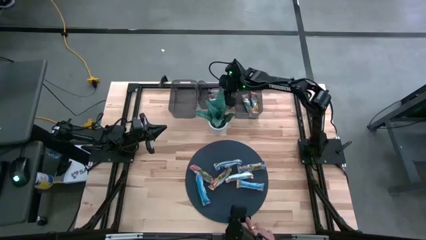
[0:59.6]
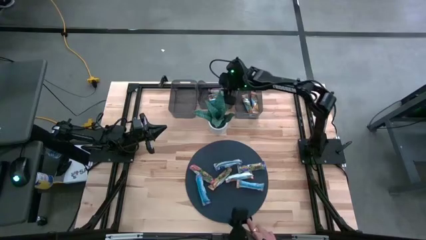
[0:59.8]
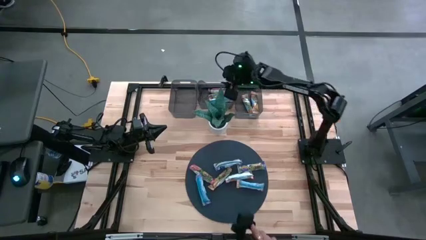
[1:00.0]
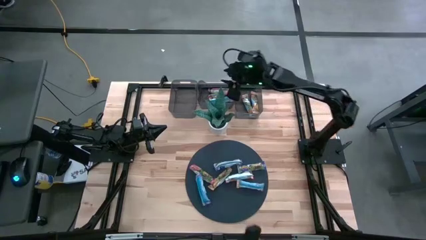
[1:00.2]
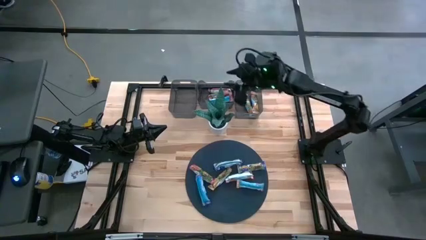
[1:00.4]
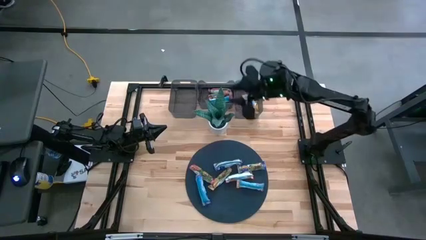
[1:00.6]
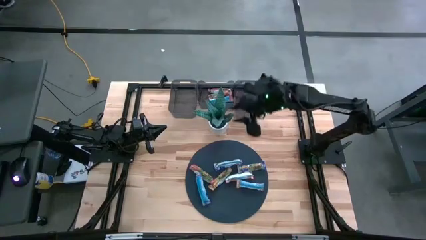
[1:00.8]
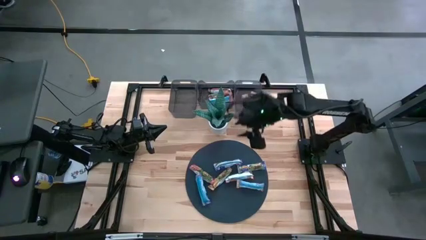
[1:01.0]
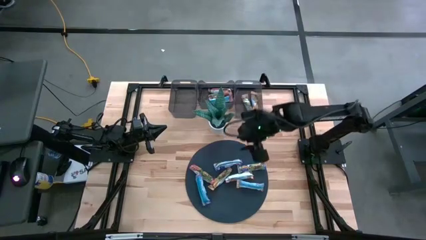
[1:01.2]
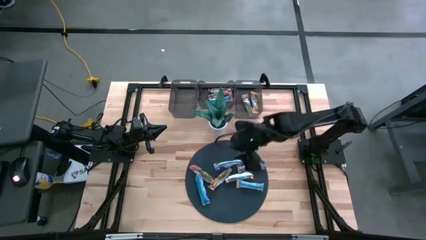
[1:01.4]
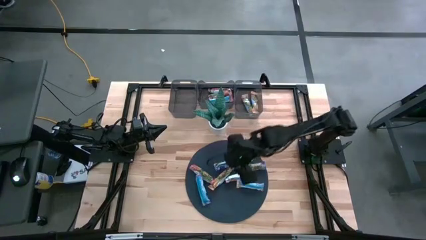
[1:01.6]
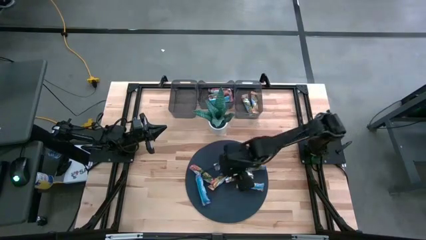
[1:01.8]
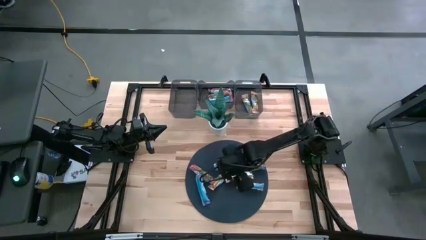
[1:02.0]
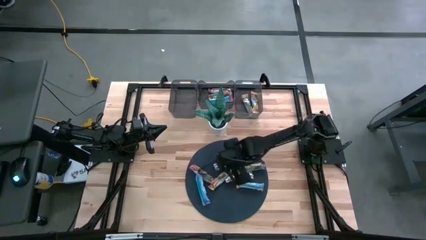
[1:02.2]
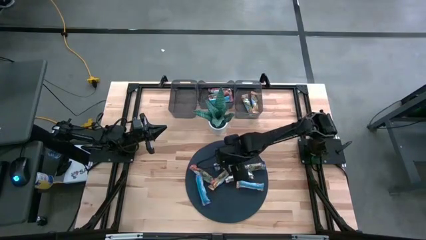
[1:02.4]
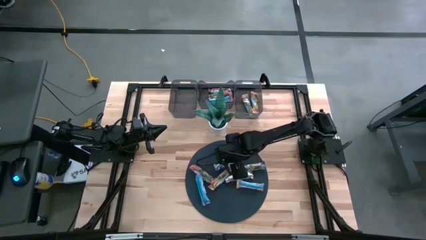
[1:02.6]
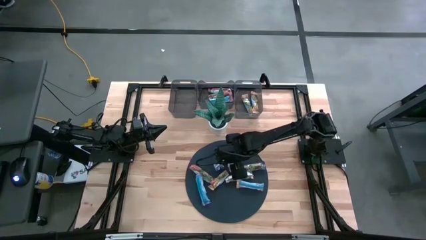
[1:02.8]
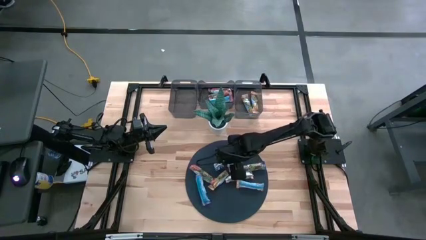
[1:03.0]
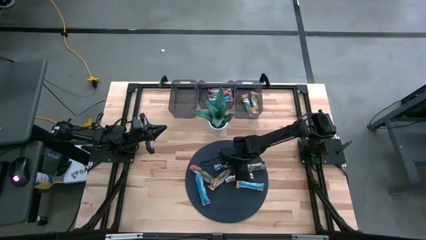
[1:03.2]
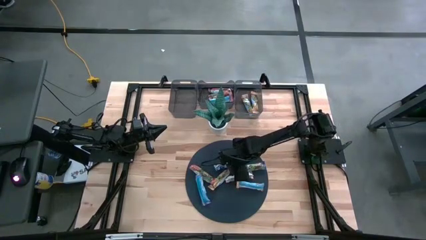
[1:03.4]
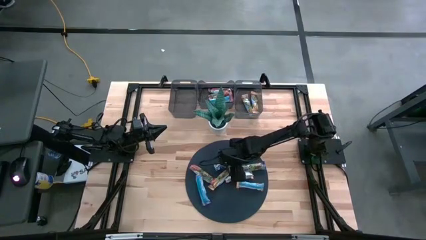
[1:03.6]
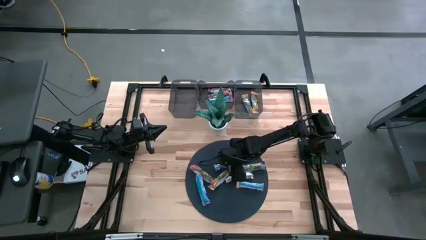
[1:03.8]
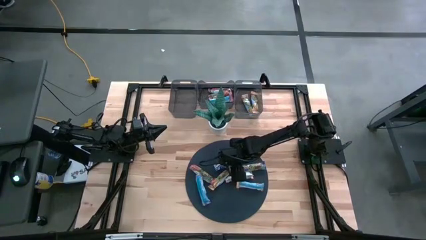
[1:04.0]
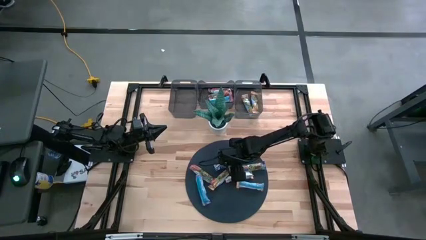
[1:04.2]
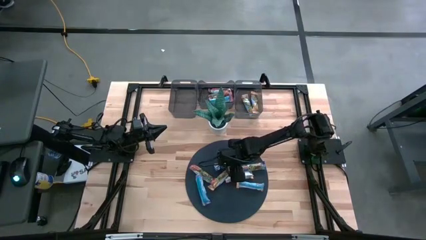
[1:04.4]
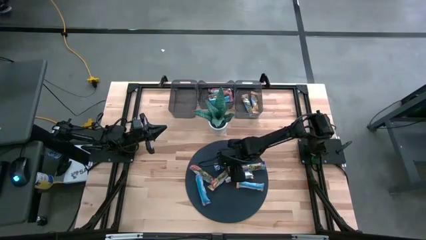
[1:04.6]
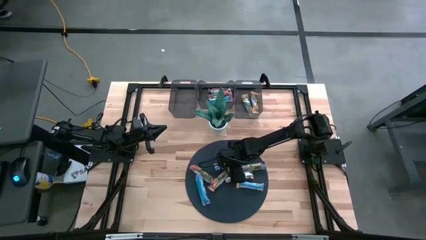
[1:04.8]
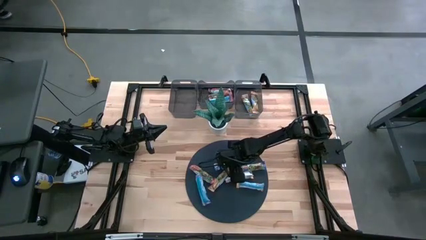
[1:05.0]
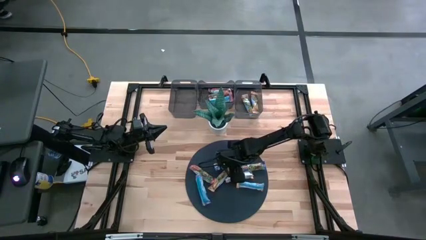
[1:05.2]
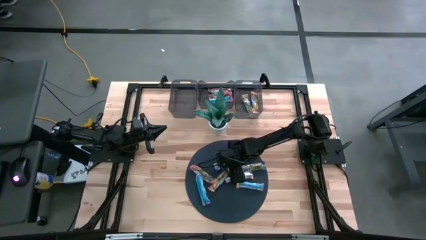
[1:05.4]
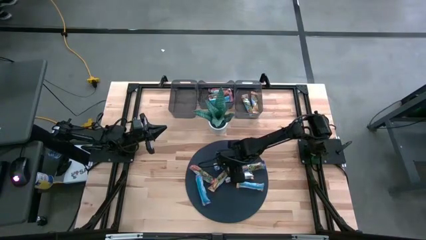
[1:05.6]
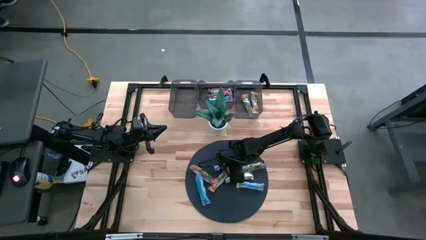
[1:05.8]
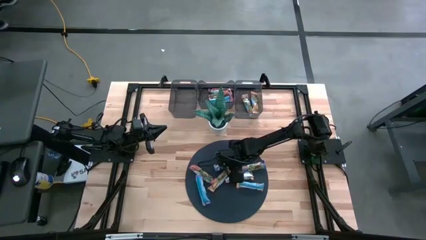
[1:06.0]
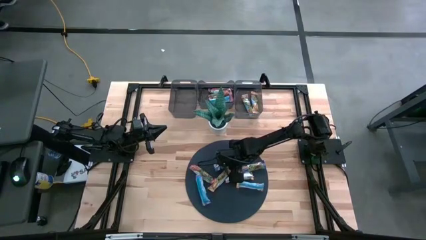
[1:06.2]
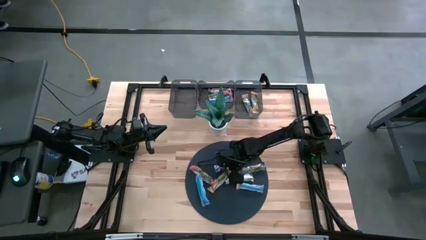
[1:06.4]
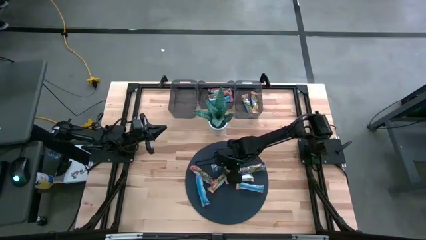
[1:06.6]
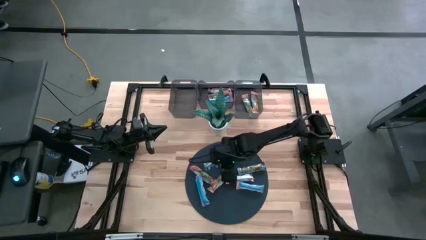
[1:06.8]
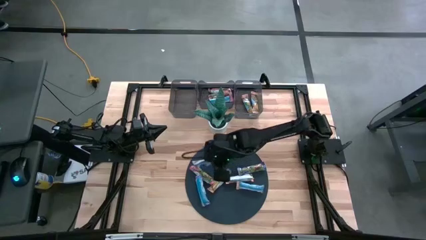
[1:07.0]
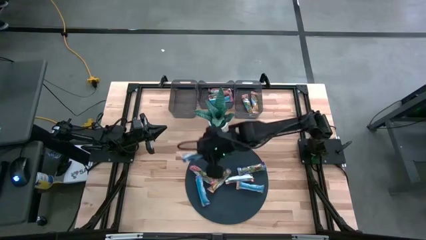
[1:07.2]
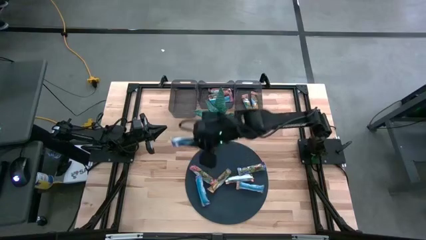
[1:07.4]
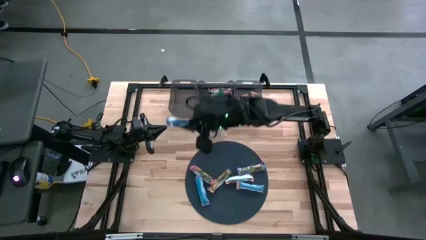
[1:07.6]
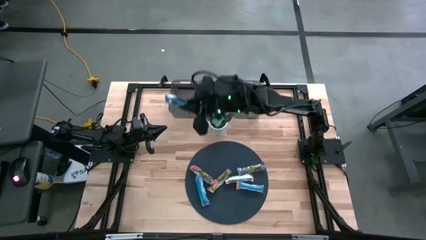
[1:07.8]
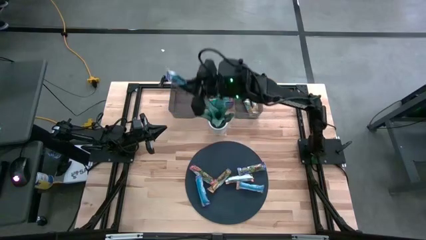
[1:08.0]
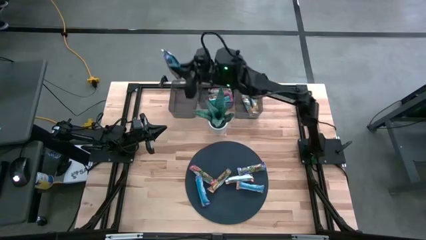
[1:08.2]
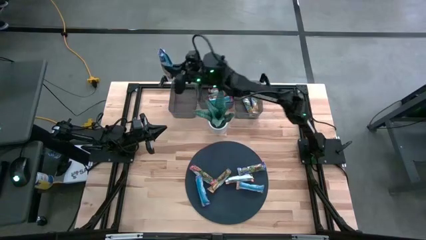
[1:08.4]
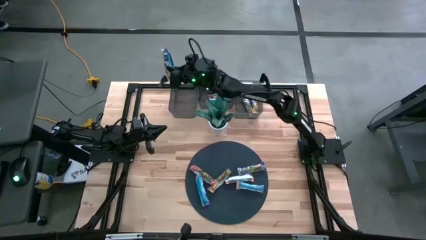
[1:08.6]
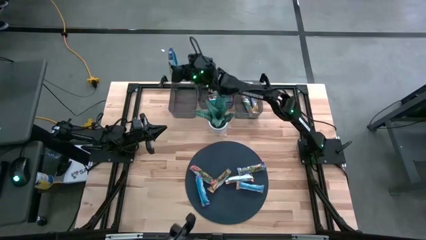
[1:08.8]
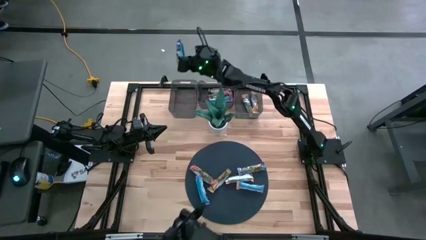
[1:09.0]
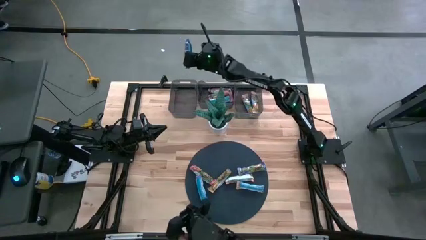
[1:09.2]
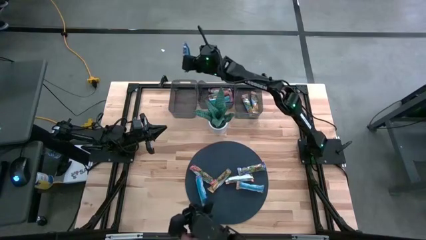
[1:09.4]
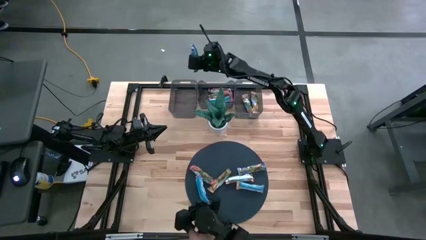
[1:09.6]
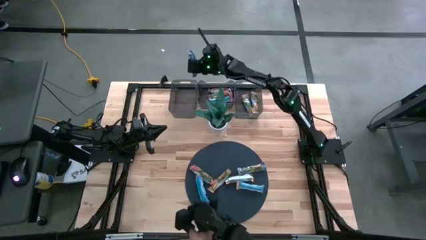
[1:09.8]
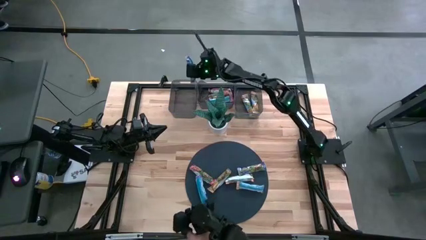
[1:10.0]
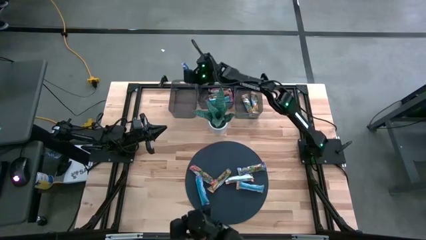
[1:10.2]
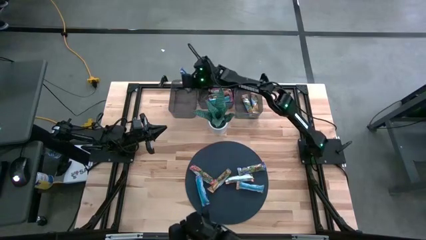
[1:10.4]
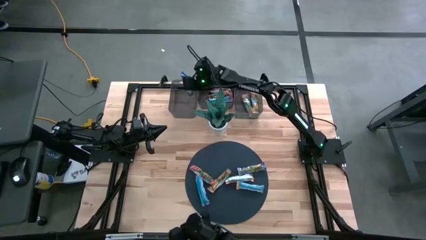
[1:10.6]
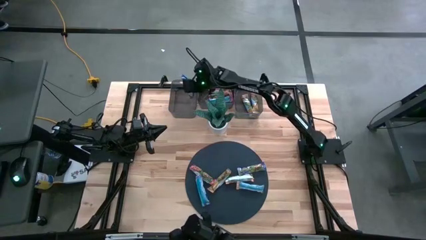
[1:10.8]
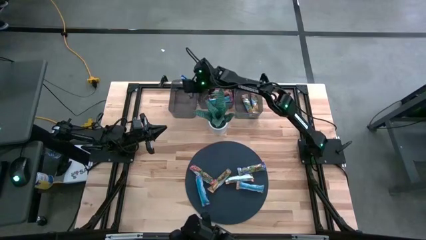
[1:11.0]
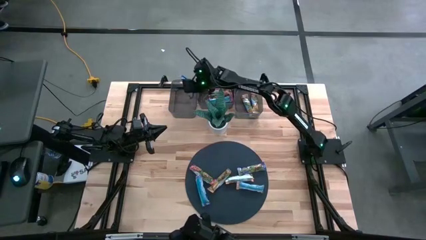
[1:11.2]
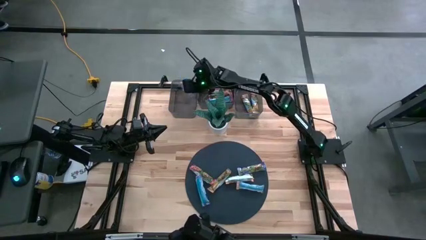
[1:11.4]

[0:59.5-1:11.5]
Task: Pick and place Granola Bars by type
Put the blue granola bar into the left black bin

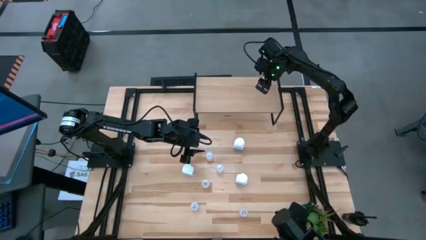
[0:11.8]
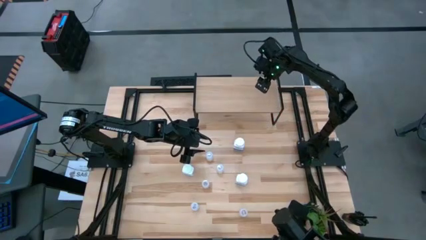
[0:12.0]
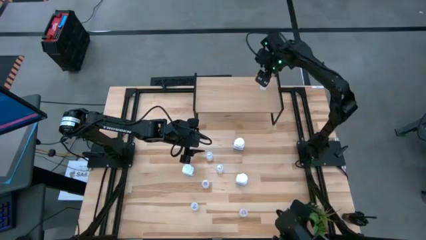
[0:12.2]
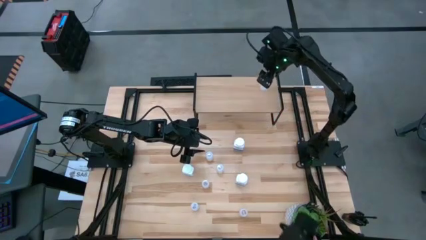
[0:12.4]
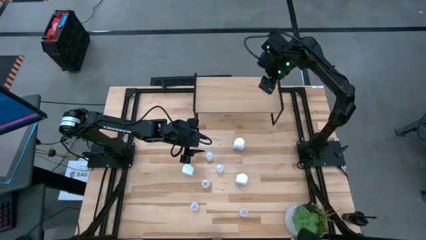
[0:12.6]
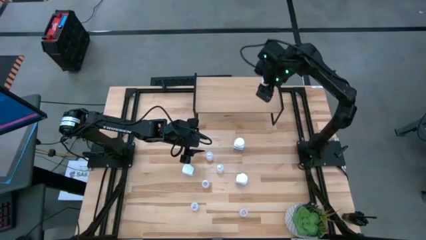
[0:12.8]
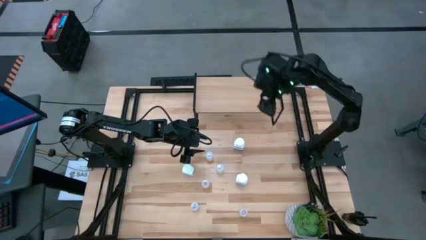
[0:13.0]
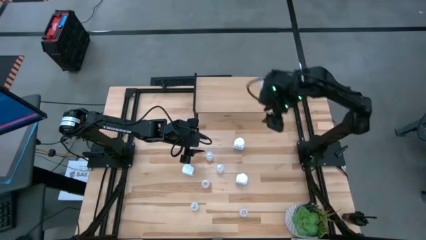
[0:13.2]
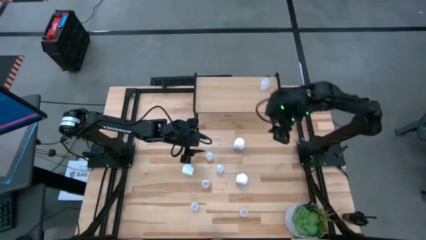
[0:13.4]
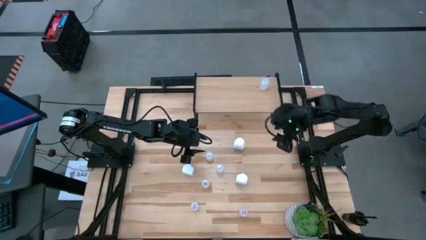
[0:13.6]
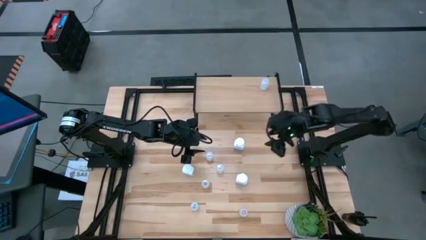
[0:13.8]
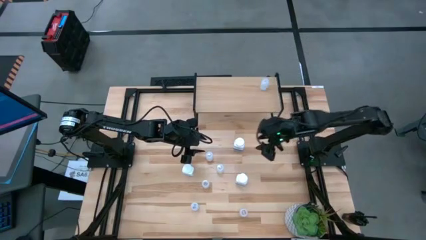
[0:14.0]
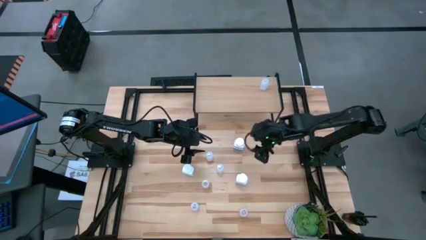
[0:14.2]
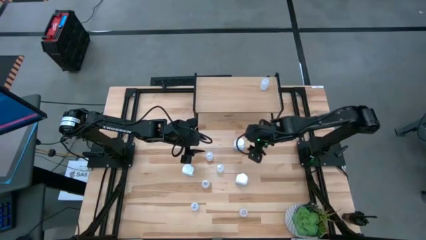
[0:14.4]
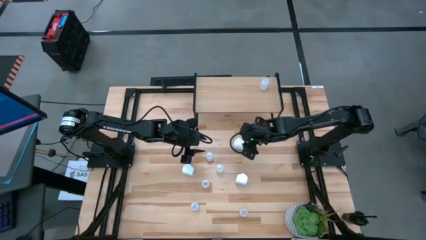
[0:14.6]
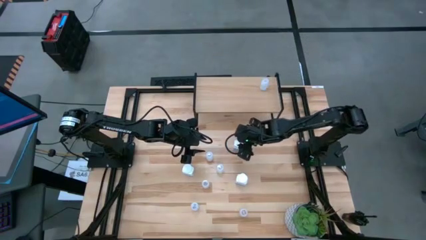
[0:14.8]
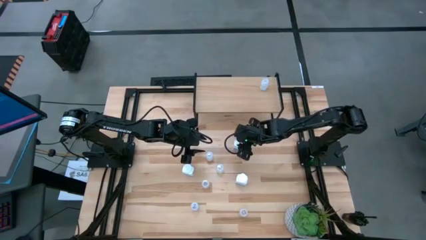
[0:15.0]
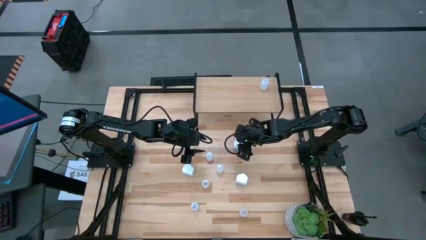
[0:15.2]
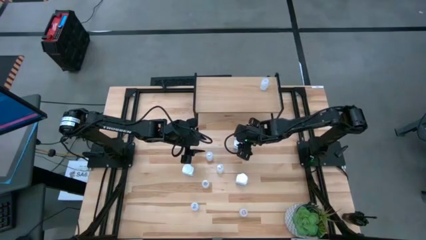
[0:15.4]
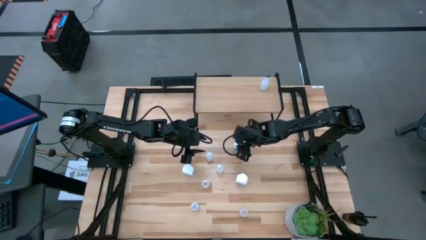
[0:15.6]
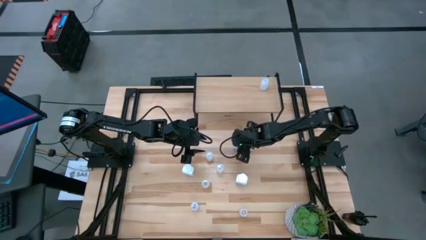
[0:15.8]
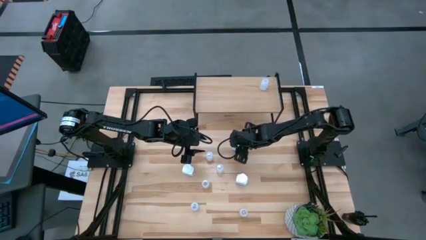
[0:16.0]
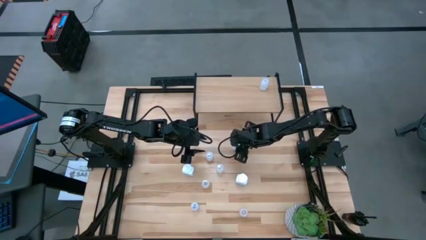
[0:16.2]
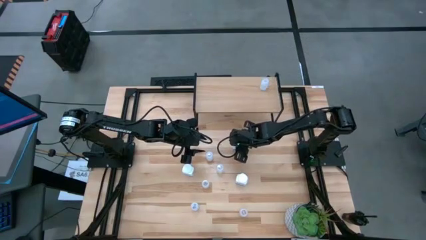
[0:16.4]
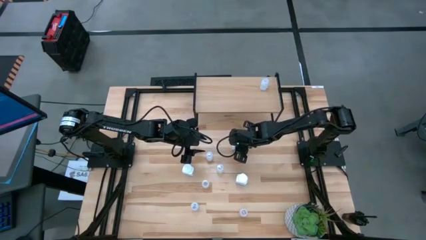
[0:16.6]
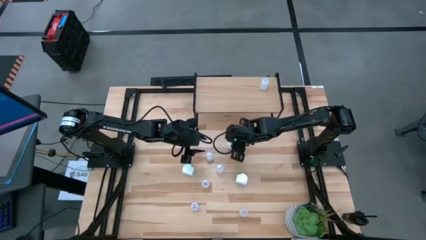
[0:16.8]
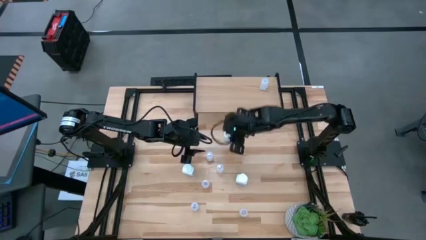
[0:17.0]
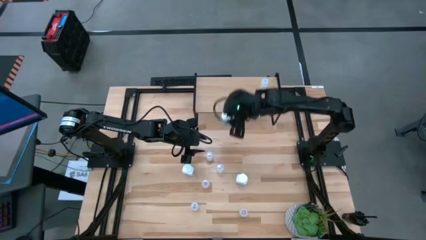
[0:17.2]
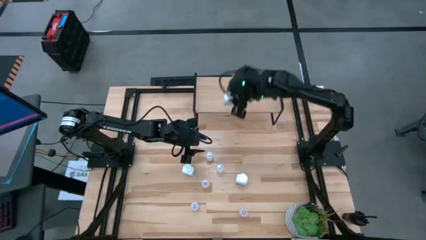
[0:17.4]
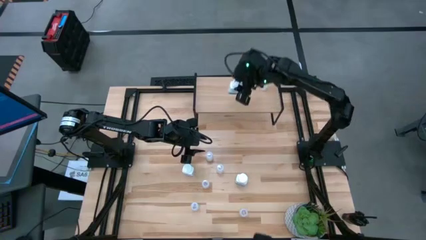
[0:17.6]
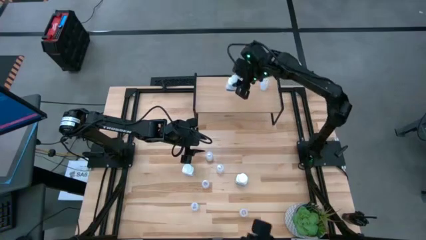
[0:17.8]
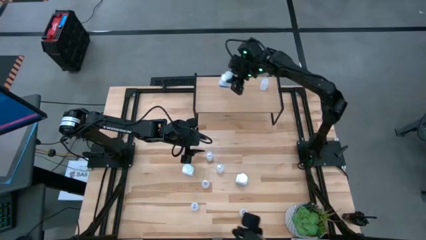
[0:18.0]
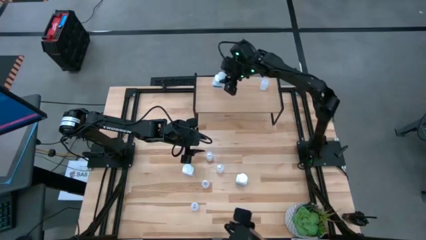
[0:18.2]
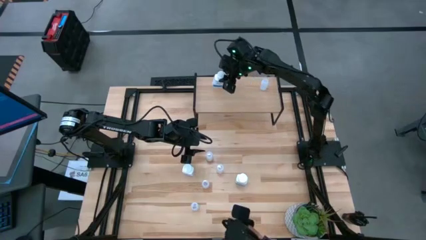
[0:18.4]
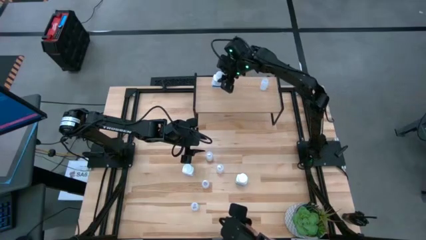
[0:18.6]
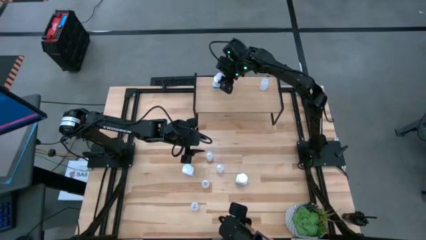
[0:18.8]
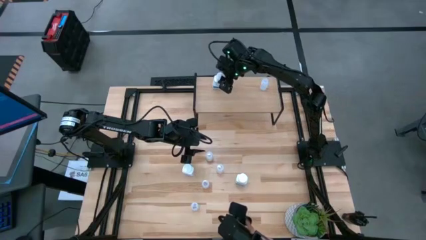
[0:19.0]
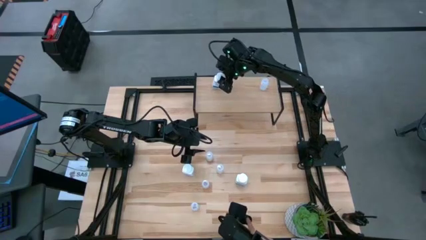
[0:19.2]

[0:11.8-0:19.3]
Task: Pick and place medicine bottles onto shelf by color
Put the top right white medicine bottle on the shelf
